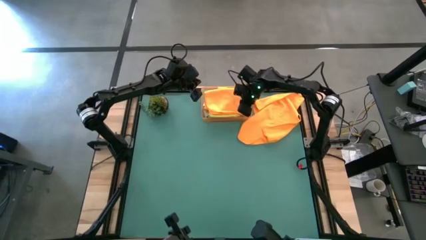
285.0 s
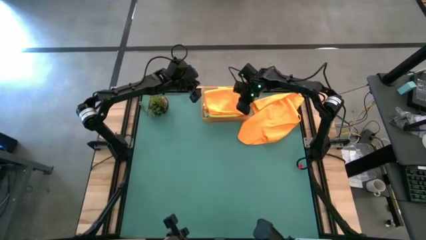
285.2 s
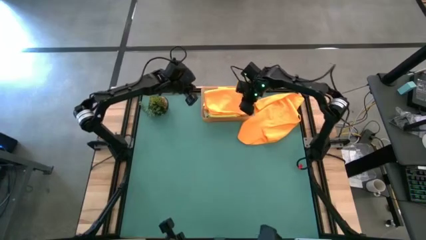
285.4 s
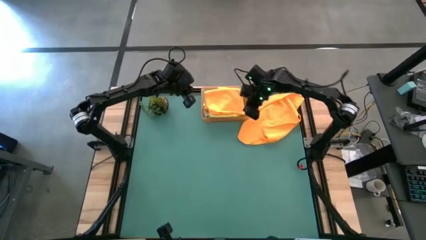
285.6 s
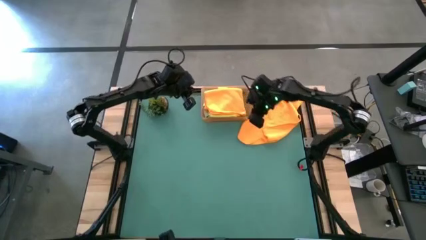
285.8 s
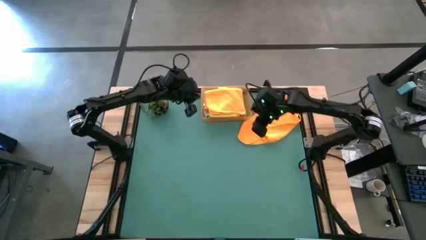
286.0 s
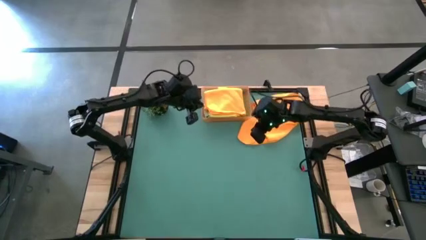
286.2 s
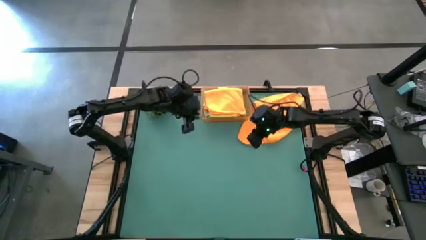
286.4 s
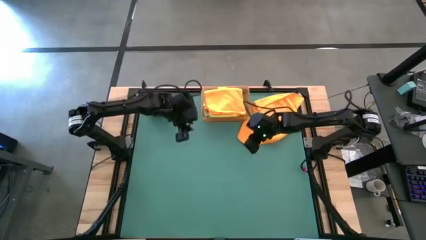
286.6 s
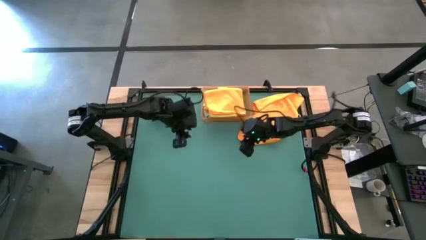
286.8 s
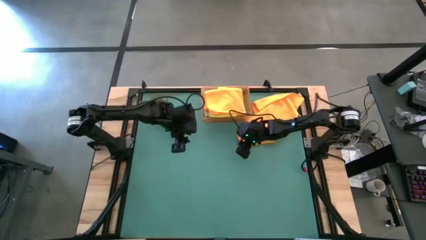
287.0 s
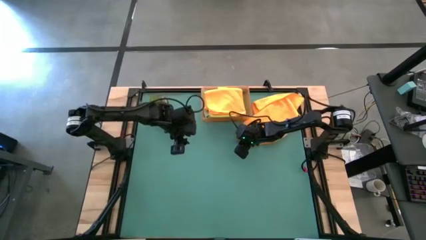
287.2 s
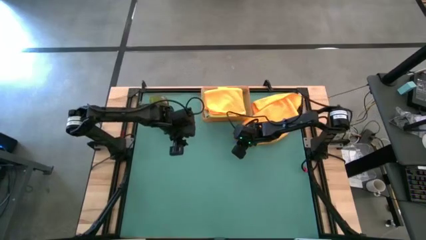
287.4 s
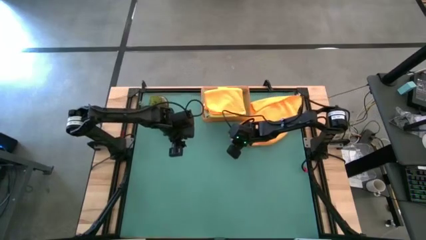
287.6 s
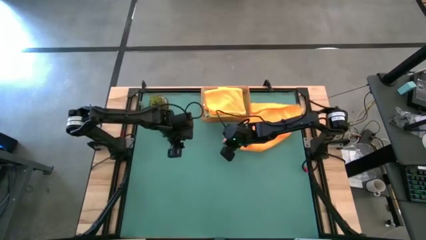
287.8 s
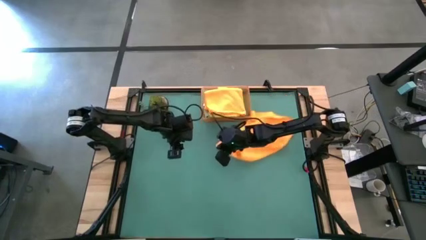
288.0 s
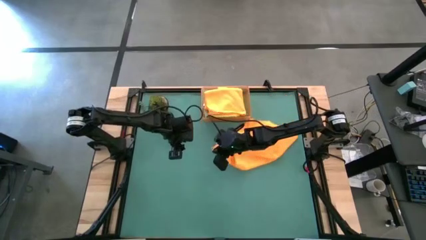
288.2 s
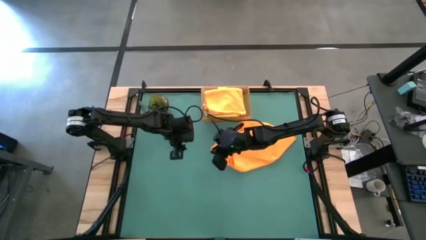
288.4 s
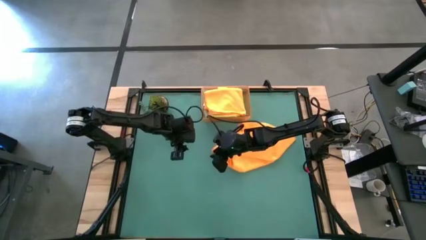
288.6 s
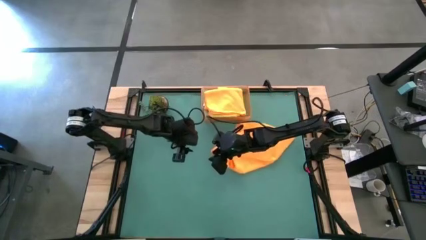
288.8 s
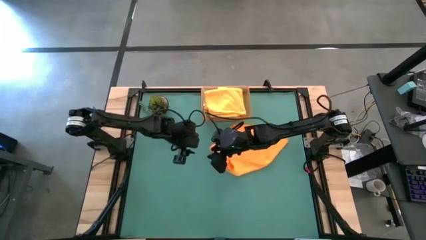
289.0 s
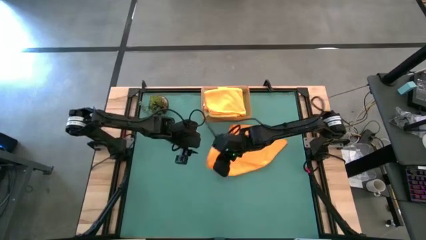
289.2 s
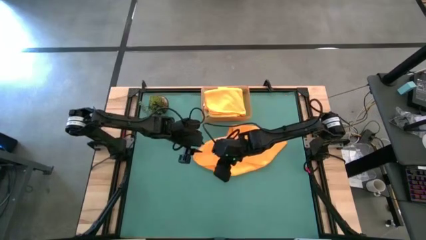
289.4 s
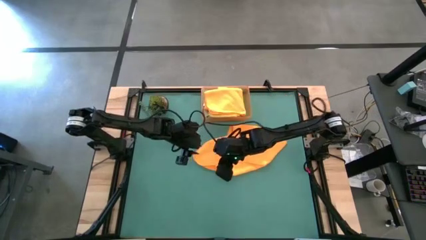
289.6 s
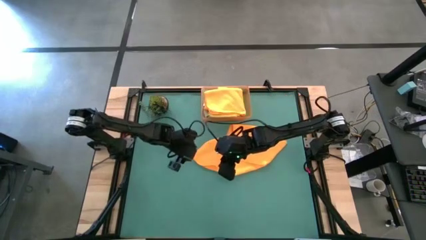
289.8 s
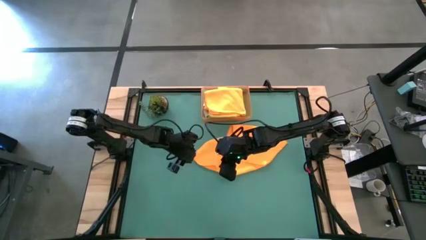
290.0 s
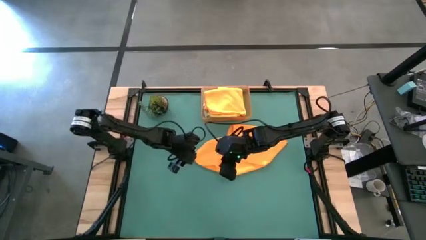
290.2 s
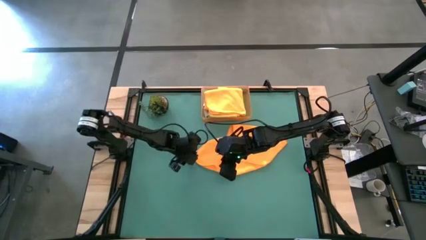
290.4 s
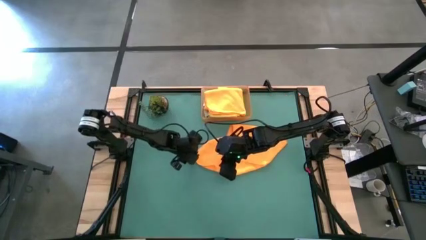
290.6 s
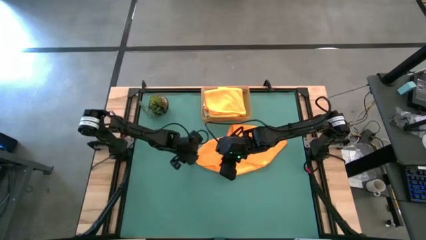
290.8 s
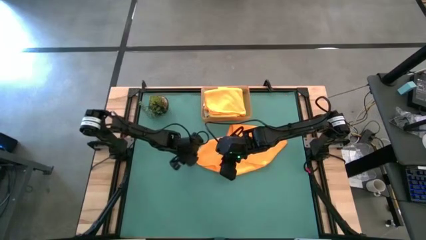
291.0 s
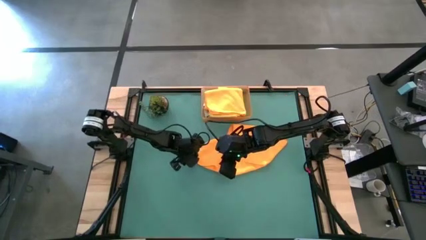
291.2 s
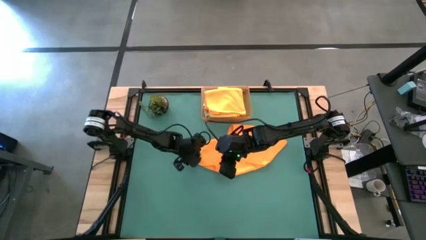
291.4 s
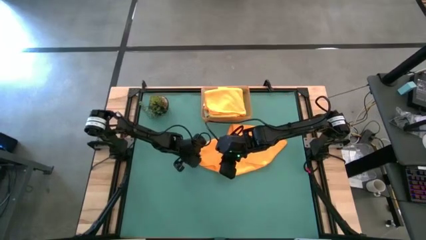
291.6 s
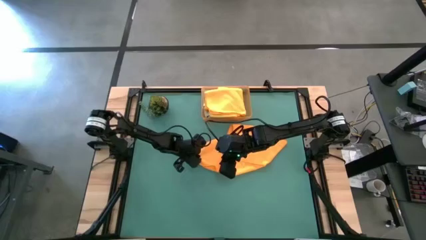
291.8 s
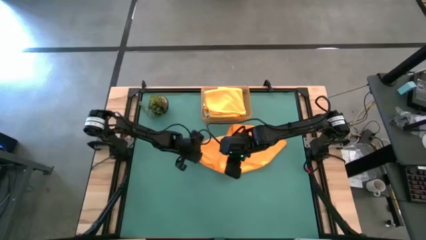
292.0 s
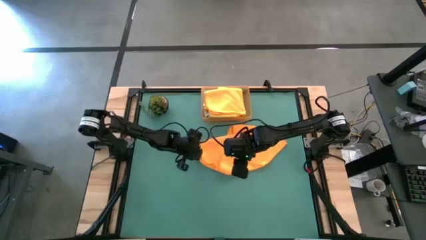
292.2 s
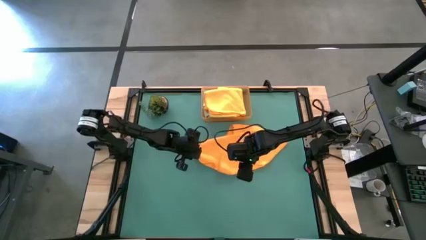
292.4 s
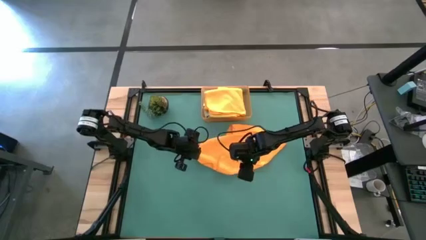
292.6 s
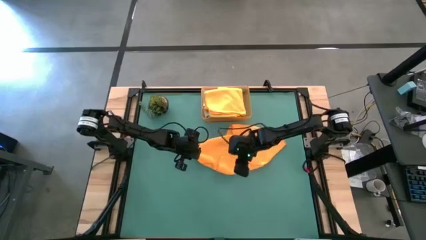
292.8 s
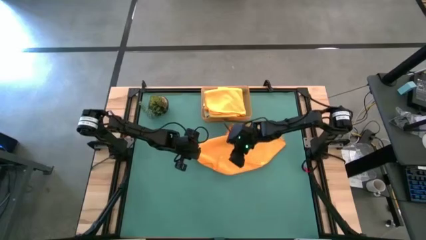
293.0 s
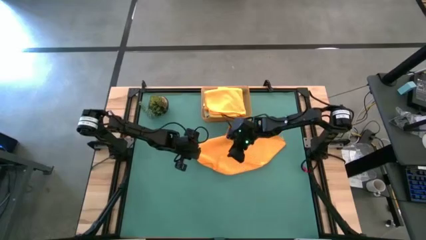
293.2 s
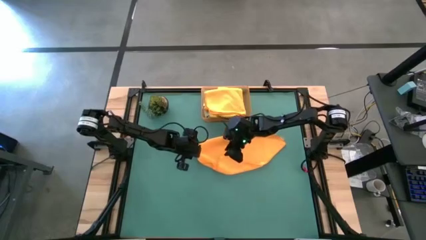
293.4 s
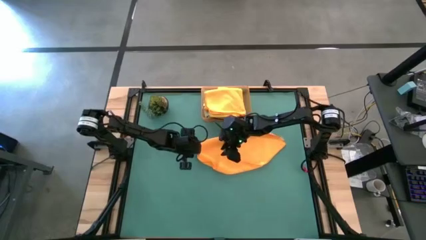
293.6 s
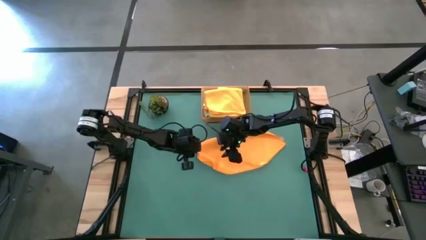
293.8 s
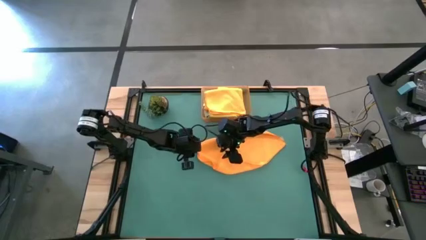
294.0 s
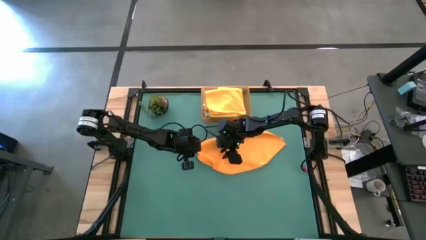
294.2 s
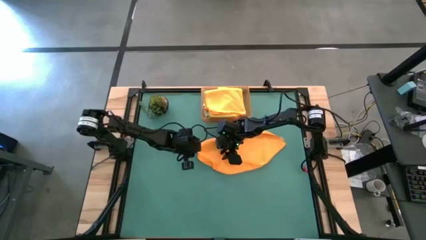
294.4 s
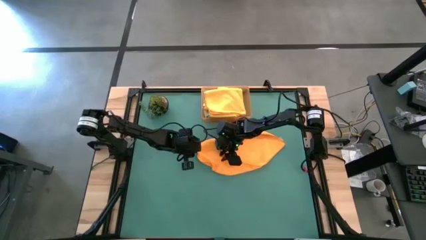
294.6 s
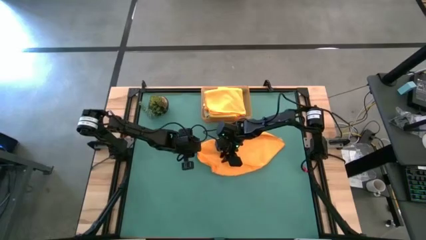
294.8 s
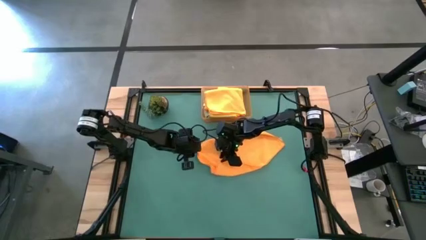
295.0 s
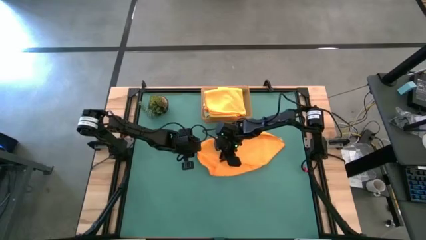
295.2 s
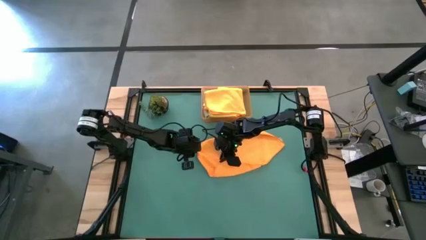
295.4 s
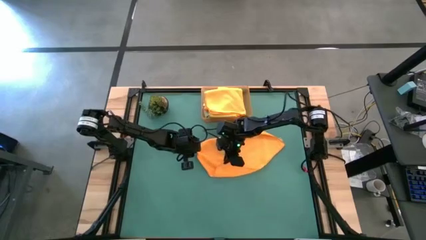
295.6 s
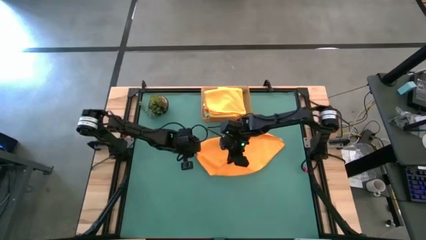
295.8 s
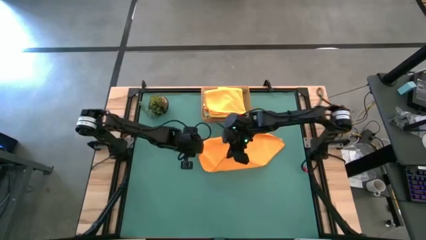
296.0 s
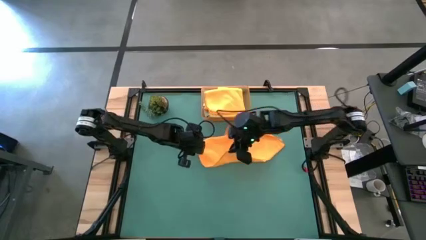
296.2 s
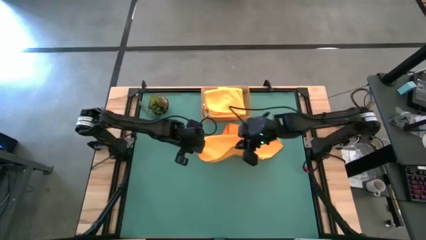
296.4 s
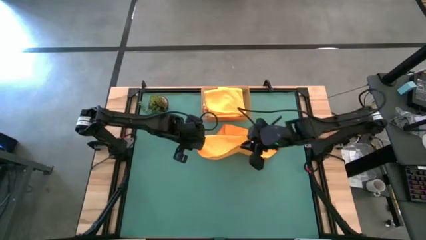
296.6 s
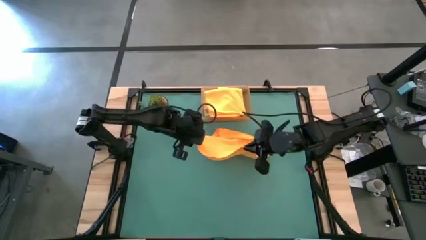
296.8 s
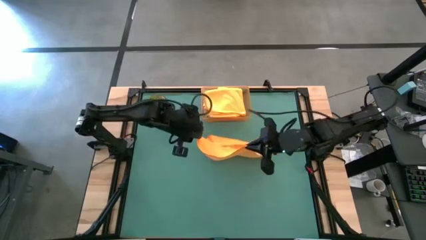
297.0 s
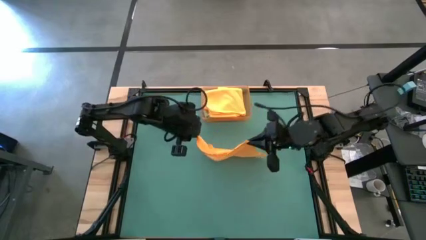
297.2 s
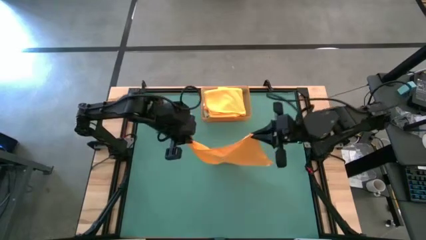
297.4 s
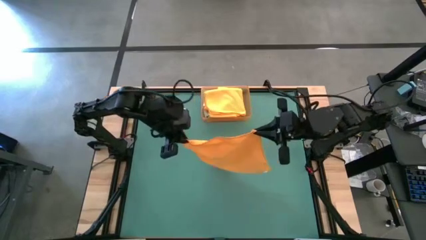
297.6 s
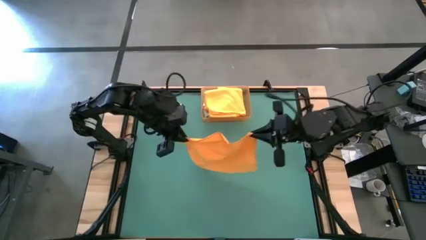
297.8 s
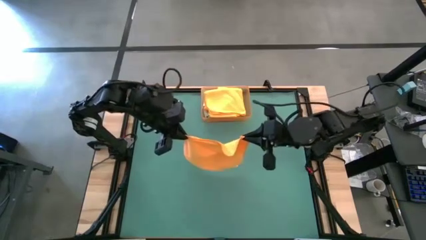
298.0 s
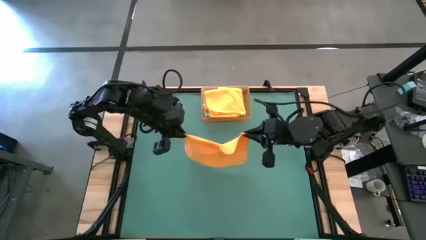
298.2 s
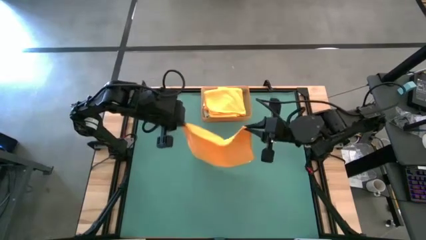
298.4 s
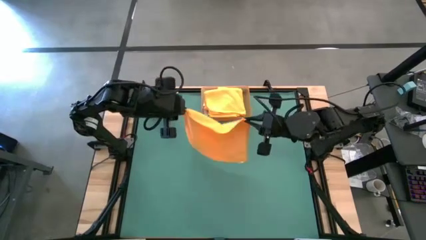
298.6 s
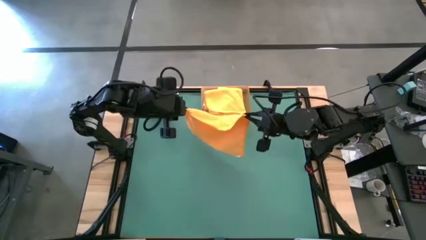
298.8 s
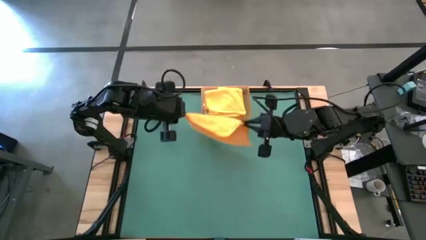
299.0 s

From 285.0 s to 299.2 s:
Task: Fold microfiber towels
Fold the orange microfiber towel
